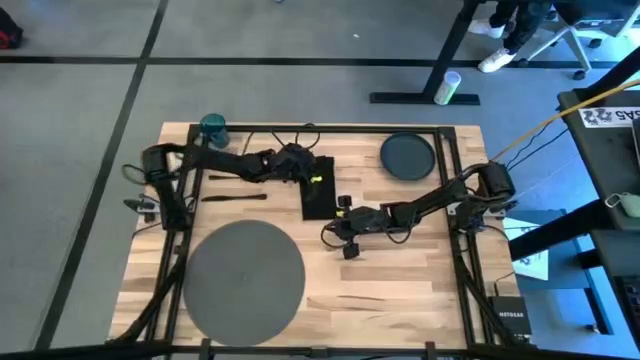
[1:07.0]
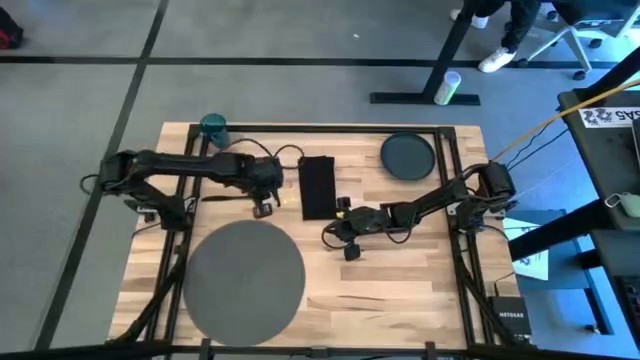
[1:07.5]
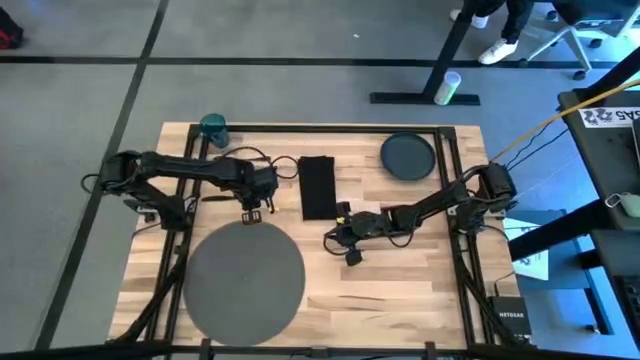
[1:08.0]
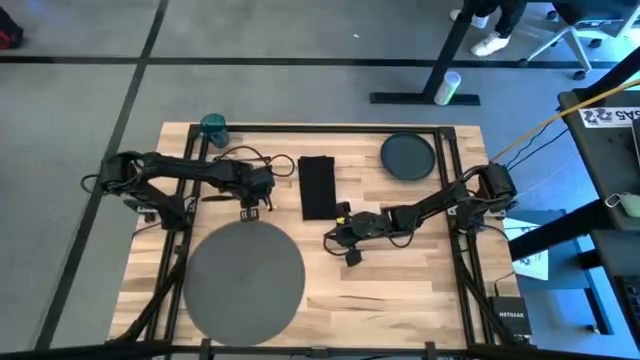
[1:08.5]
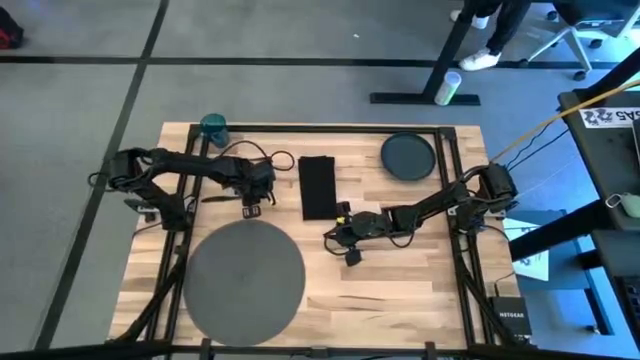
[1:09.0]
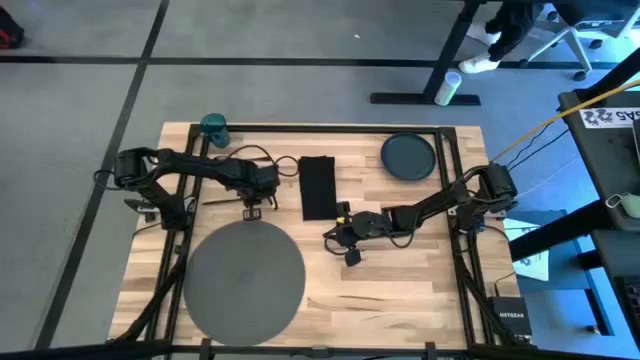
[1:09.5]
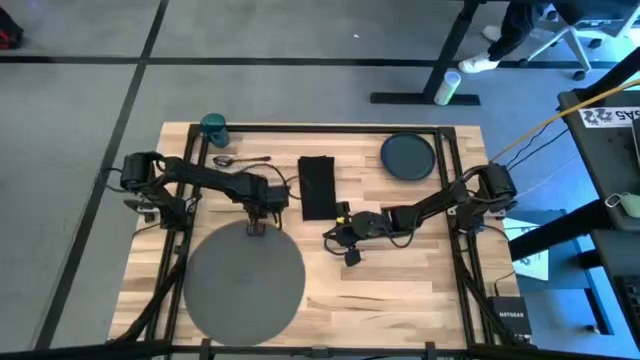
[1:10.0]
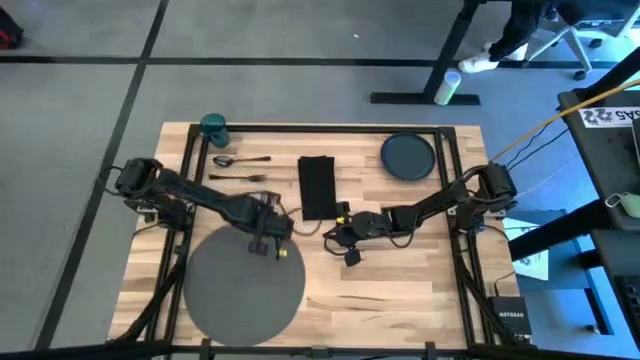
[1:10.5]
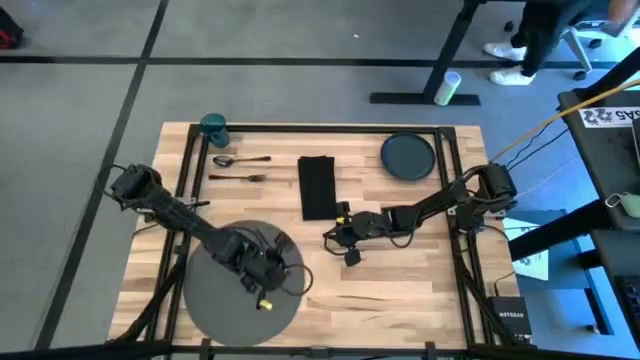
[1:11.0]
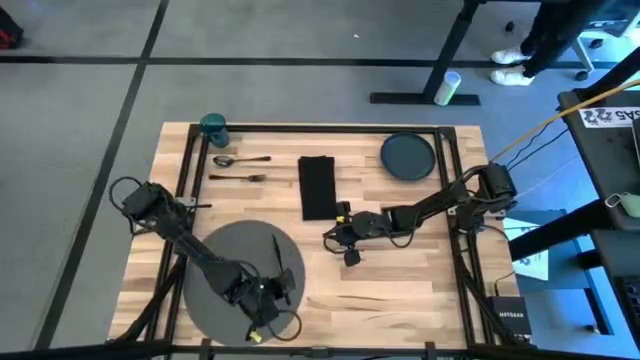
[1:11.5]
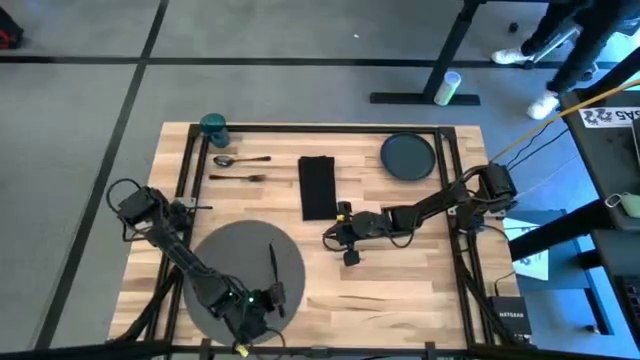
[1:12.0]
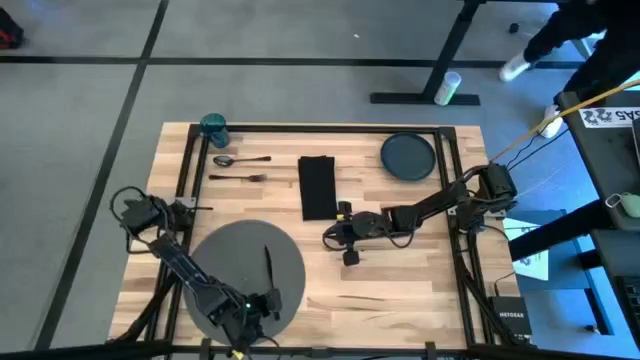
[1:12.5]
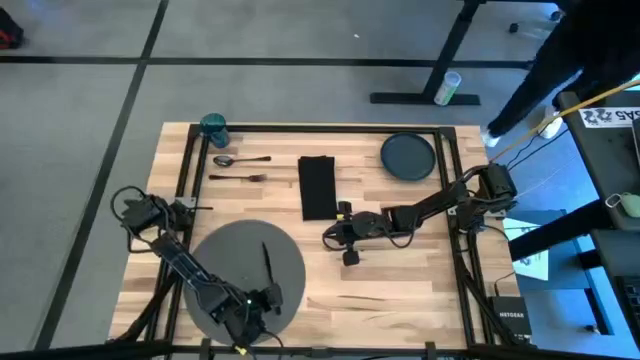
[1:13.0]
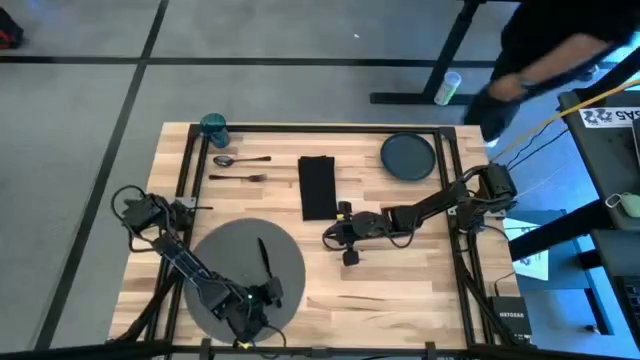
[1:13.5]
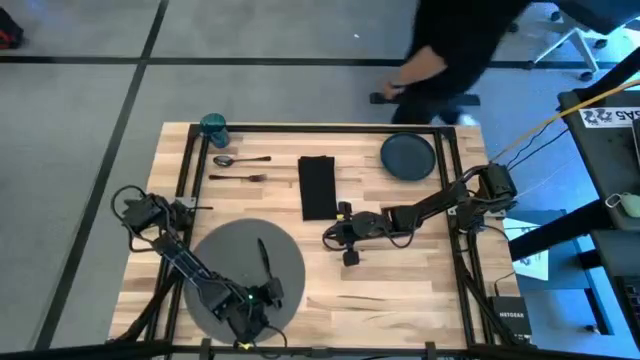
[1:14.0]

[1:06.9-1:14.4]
Task: Set table place
Put the black table knife on the black table mat

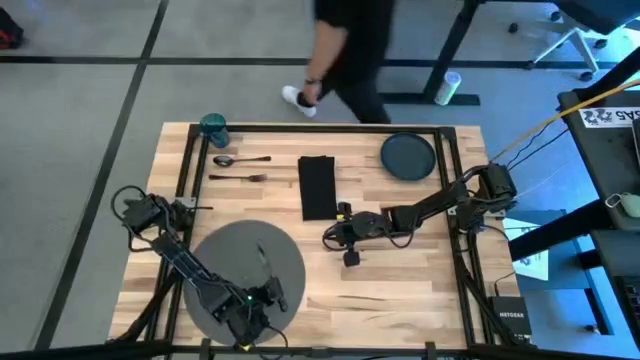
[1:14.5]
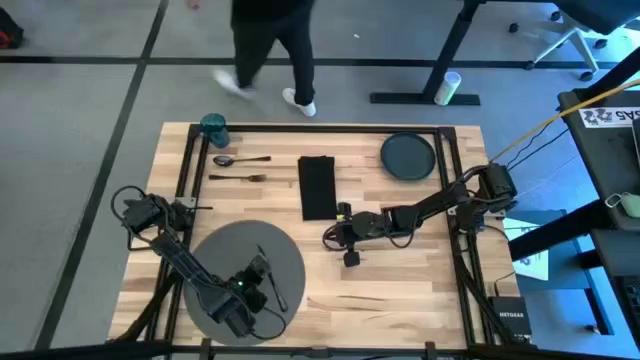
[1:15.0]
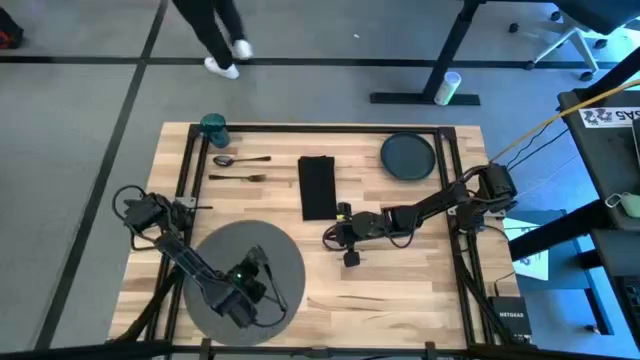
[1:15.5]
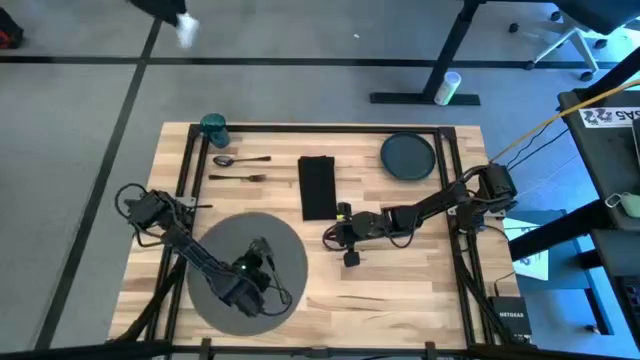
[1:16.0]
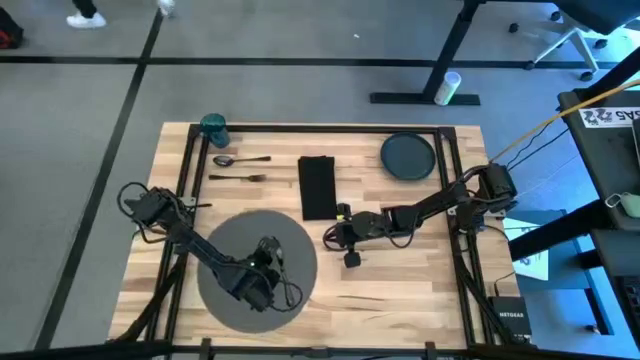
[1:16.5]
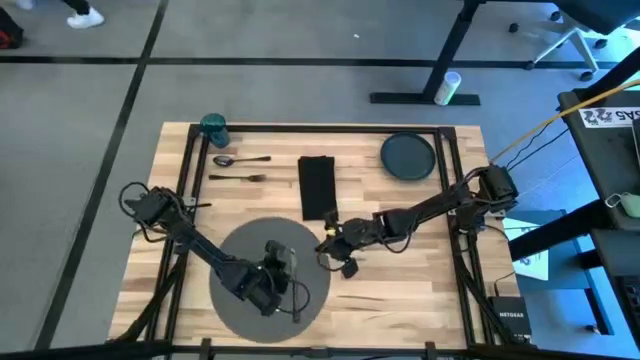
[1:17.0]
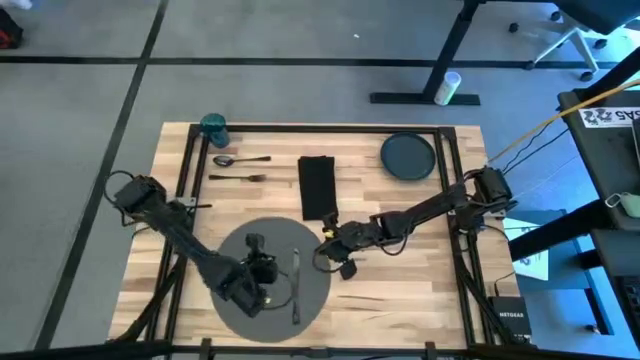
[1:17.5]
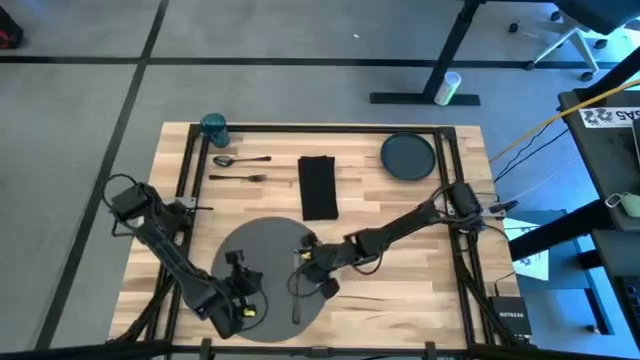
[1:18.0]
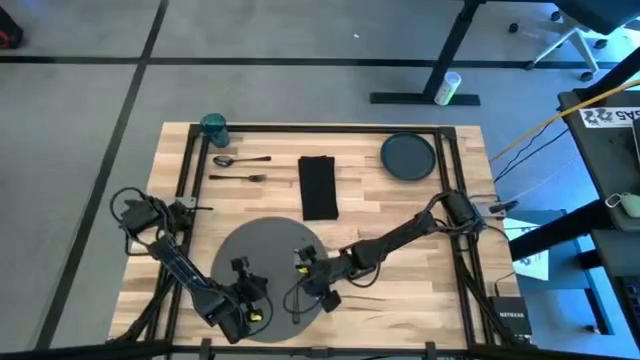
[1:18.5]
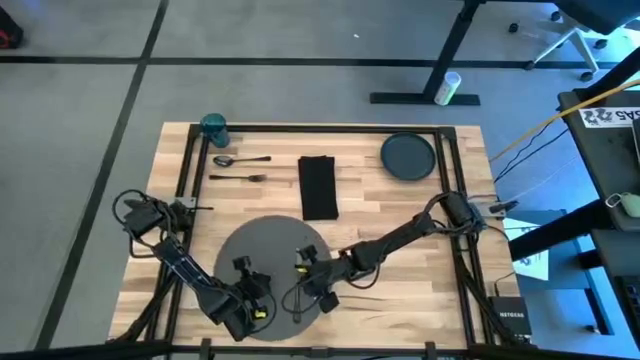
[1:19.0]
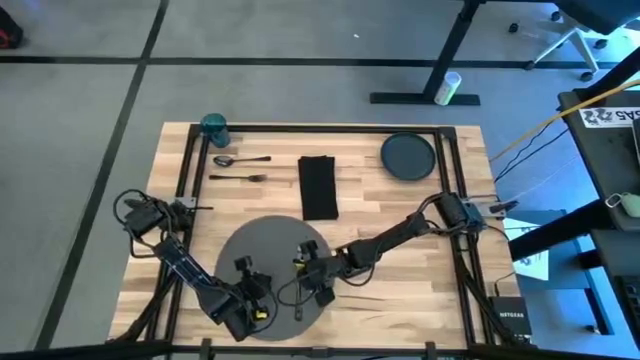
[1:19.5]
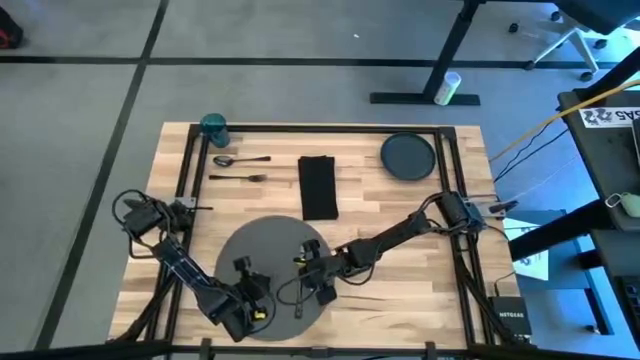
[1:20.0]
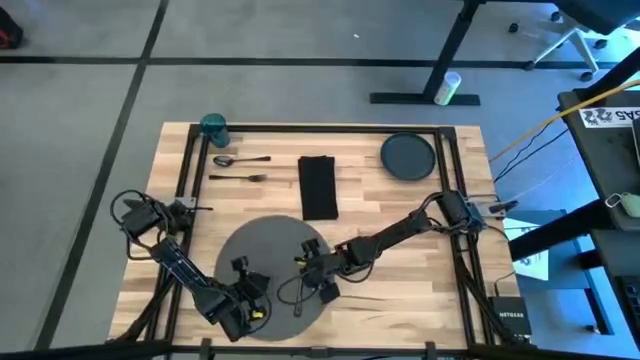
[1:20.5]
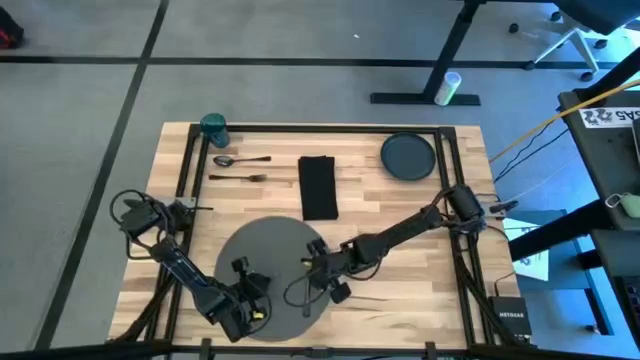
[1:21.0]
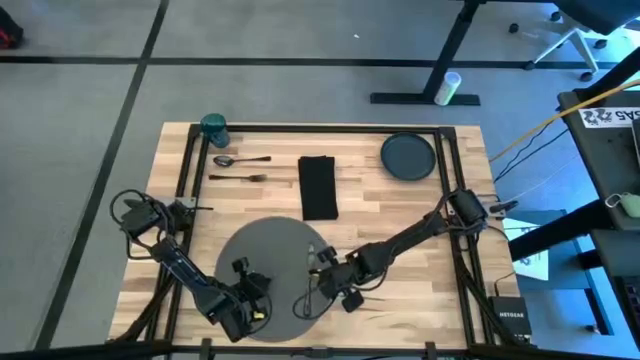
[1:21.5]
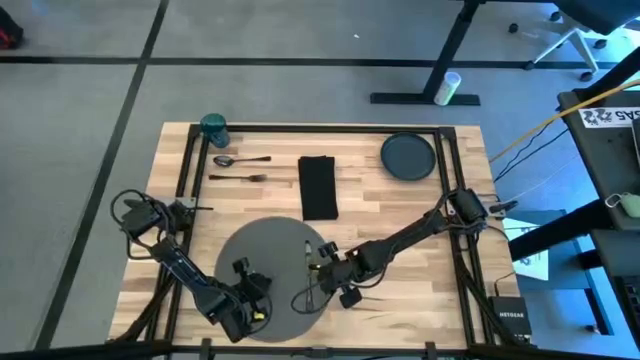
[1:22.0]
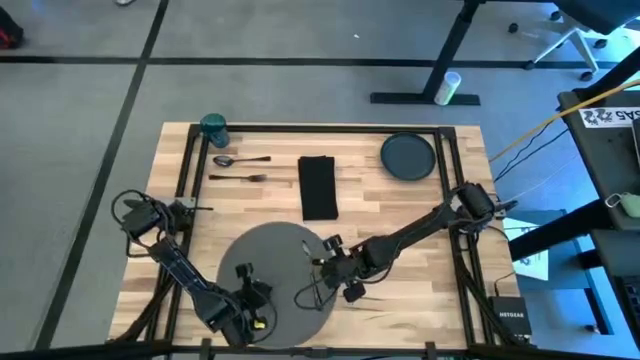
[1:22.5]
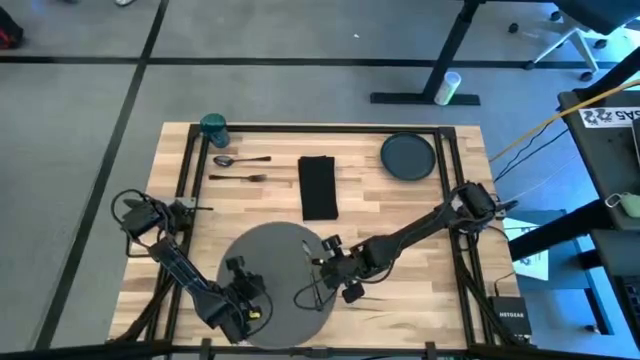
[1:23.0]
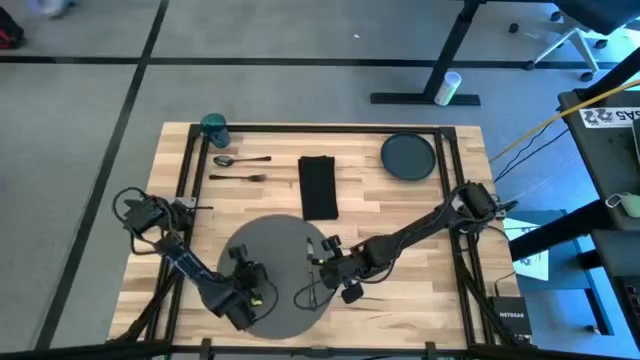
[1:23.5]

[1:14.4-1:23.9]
Adjust the black table mat

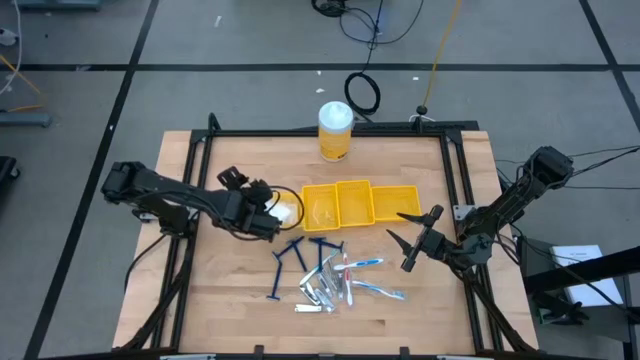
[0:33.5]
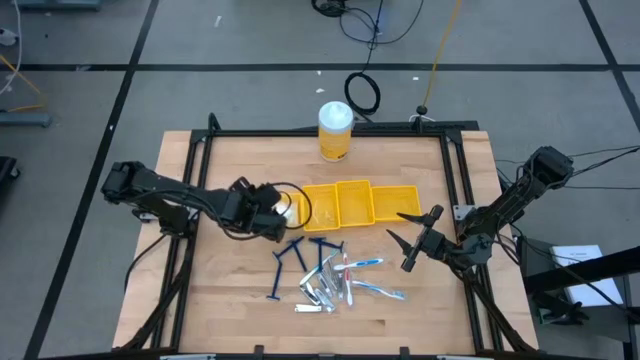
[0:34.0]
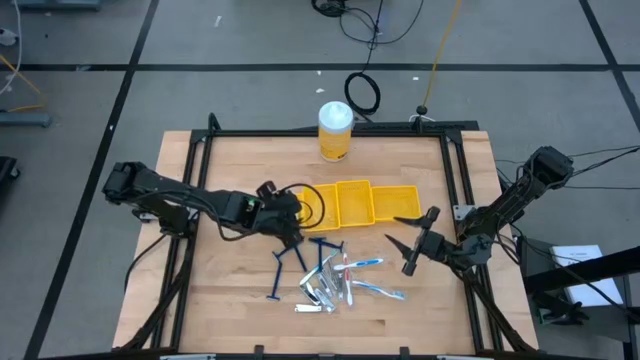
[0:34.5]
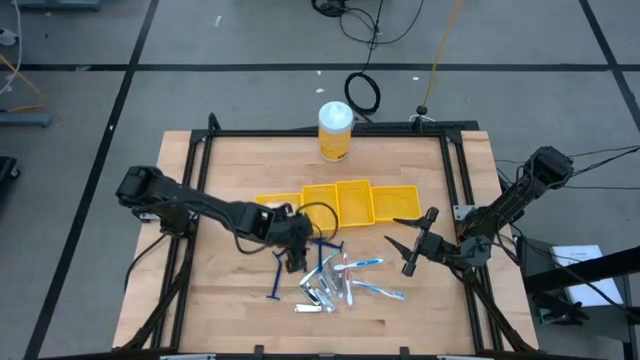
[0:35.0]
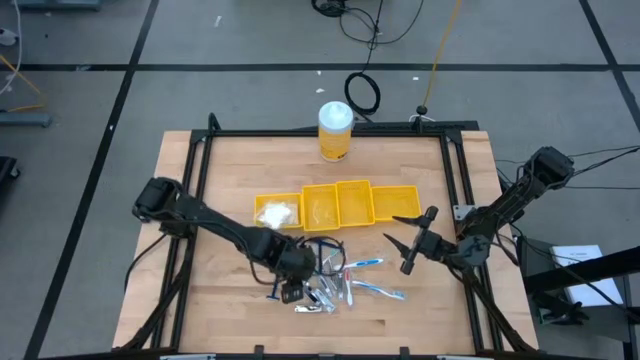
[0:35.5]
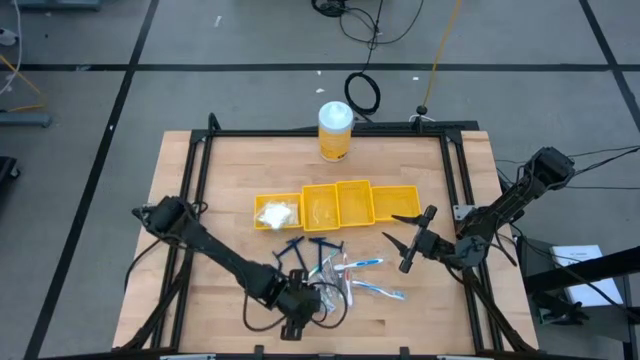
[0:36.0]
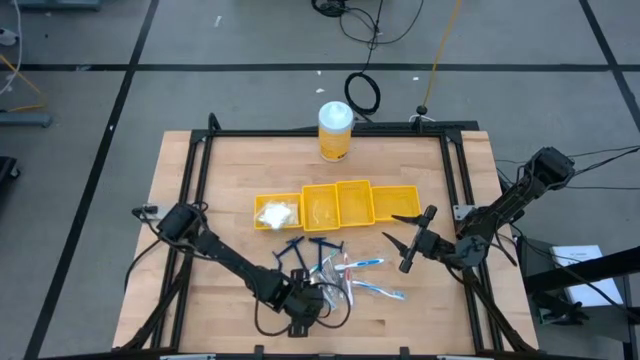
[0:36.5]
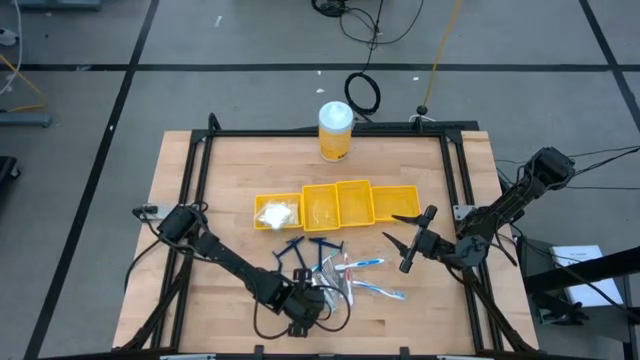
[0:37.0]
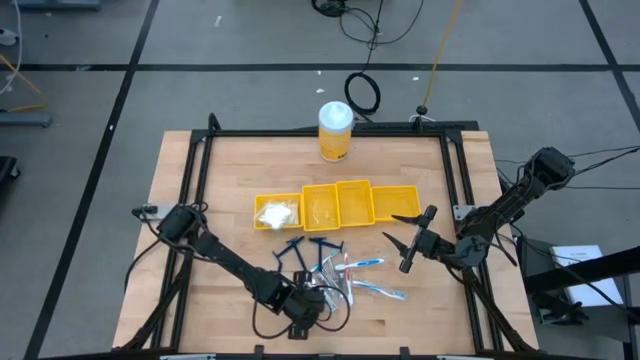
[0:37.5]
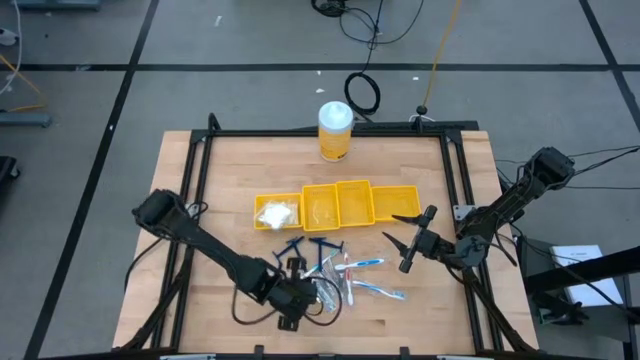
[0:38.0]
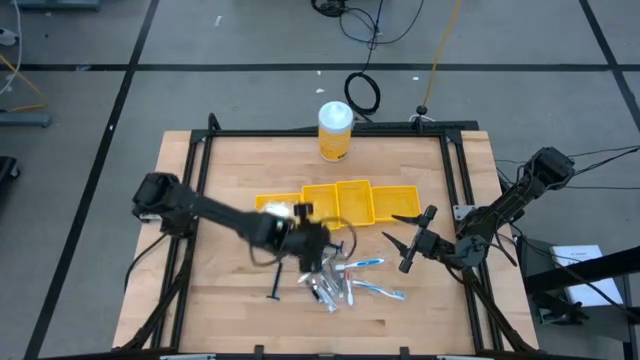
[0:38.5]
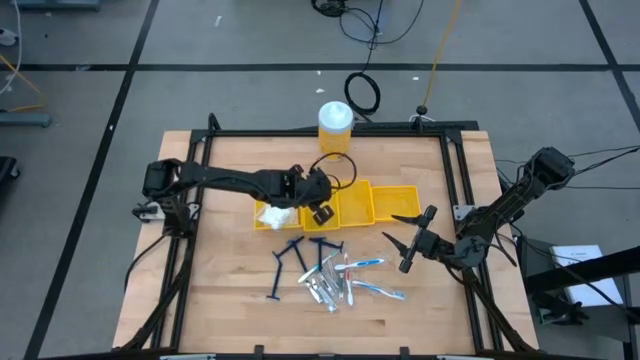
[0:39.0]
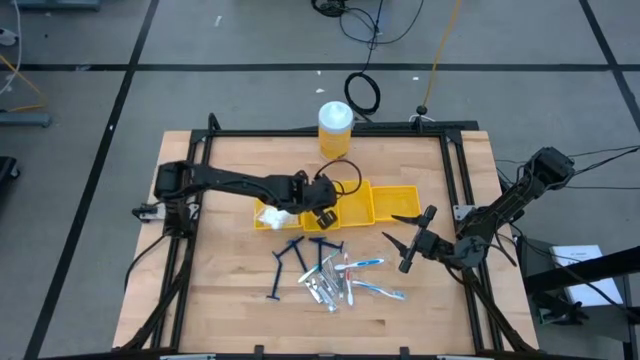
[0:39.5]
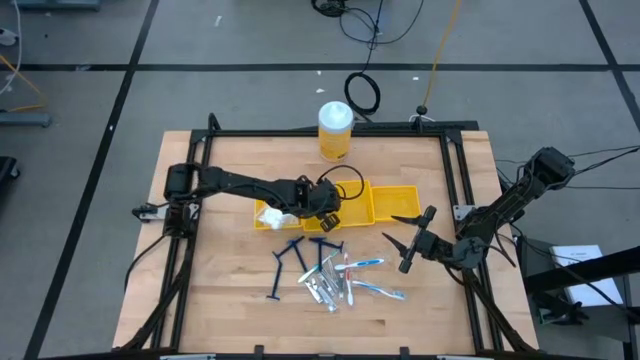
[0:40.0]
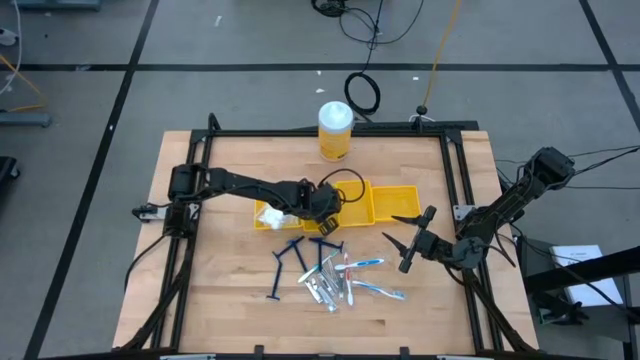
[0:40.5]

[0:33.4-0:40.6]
Task: Pick & Place Travel size toiletries
Put the silver nail cutter into the middle left yellow bin
